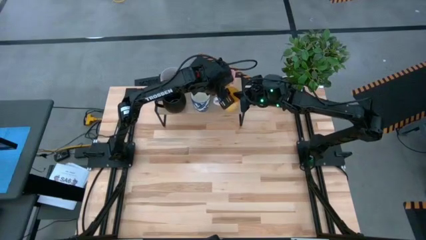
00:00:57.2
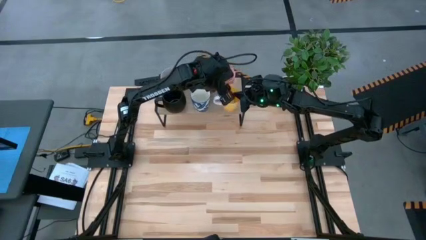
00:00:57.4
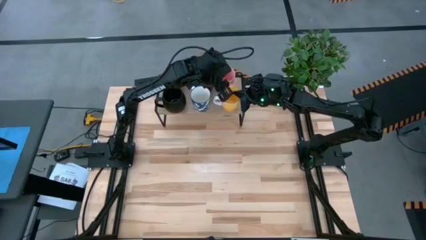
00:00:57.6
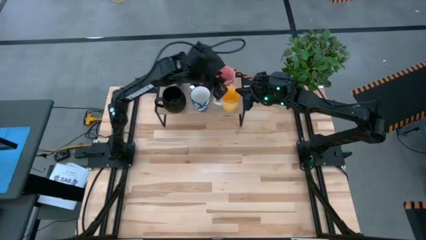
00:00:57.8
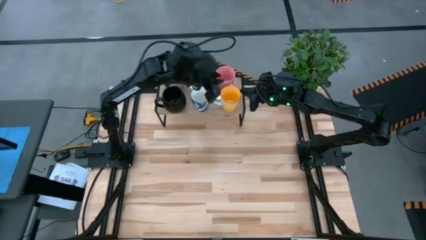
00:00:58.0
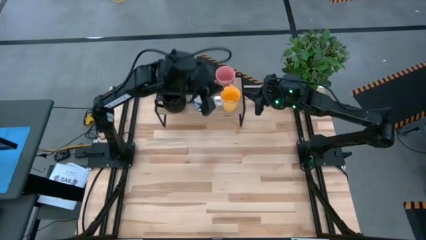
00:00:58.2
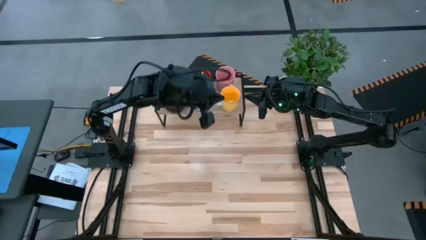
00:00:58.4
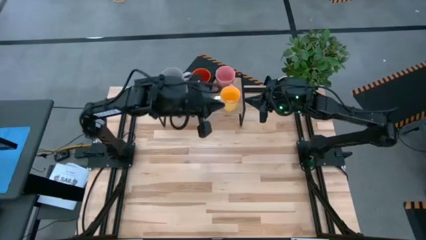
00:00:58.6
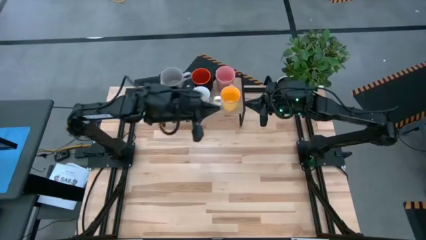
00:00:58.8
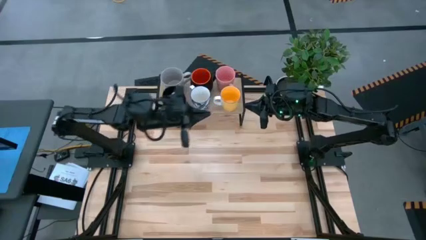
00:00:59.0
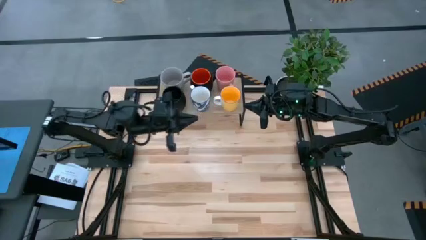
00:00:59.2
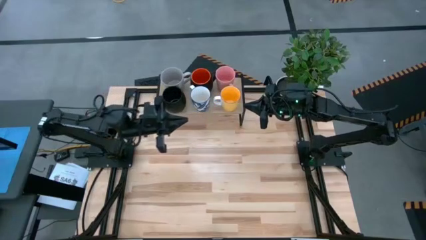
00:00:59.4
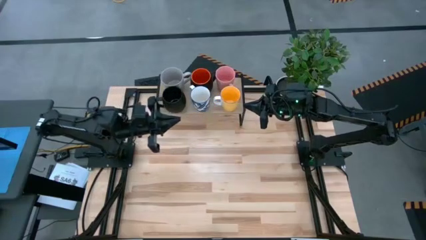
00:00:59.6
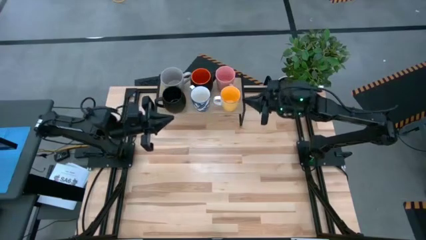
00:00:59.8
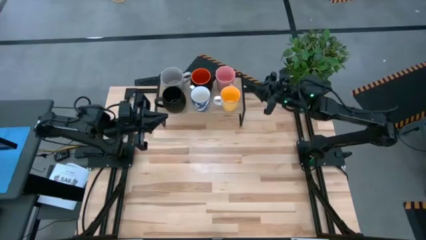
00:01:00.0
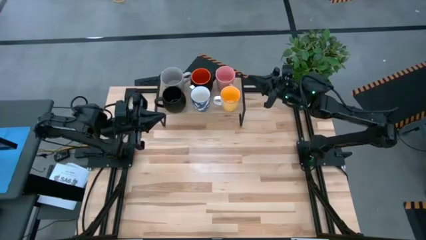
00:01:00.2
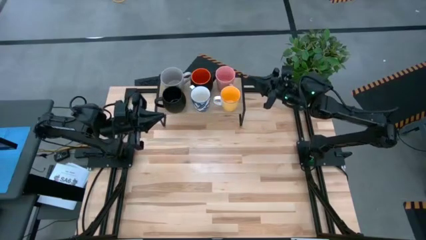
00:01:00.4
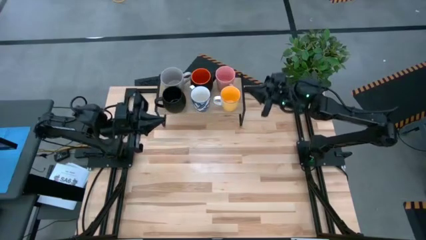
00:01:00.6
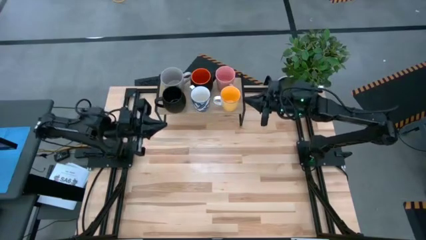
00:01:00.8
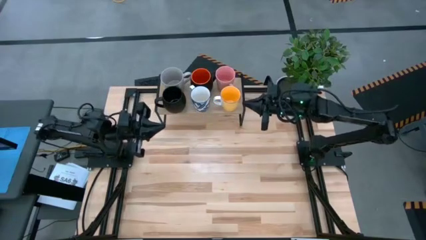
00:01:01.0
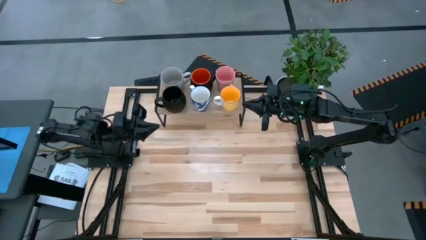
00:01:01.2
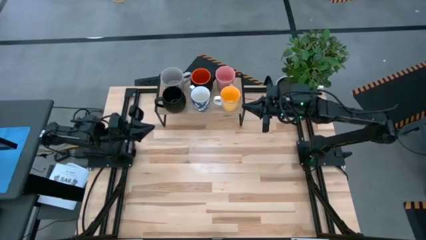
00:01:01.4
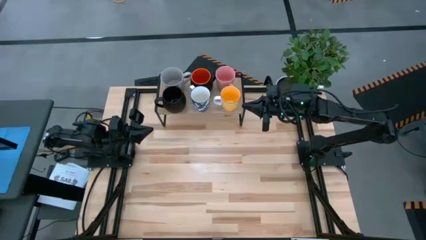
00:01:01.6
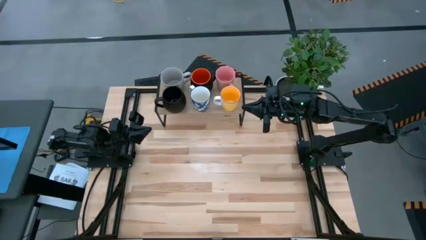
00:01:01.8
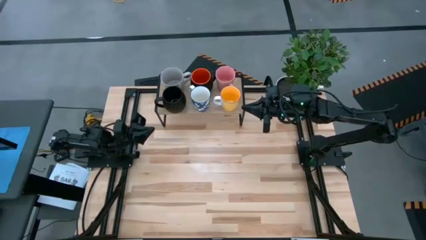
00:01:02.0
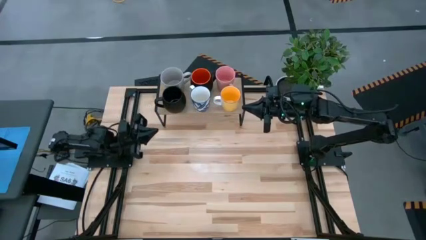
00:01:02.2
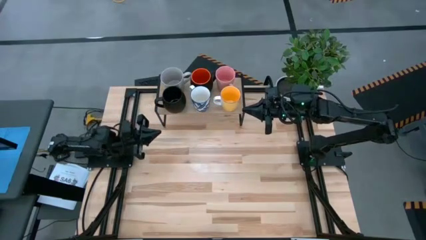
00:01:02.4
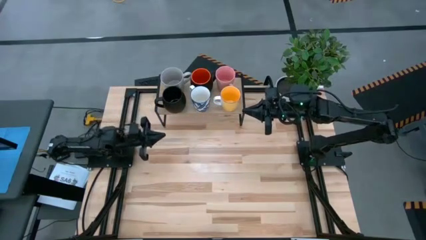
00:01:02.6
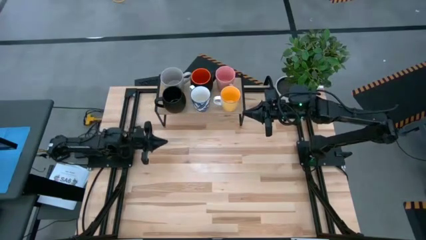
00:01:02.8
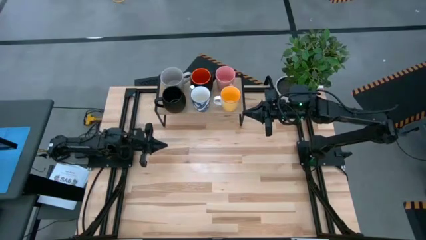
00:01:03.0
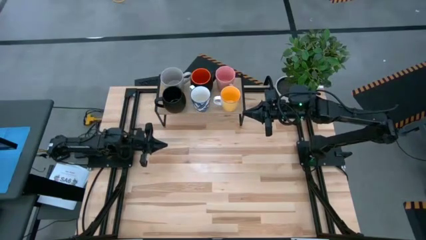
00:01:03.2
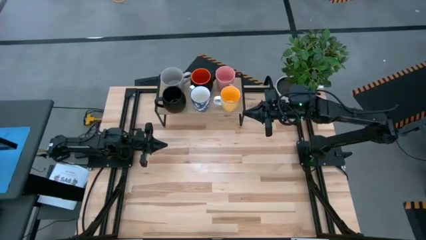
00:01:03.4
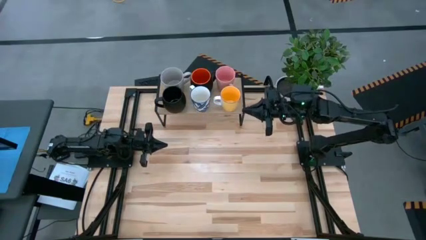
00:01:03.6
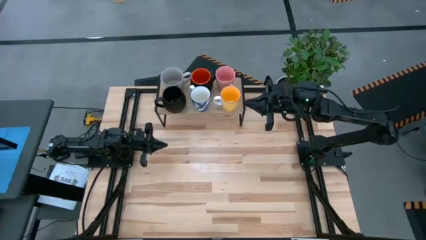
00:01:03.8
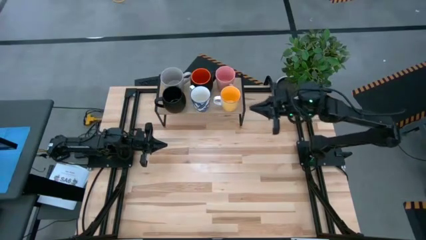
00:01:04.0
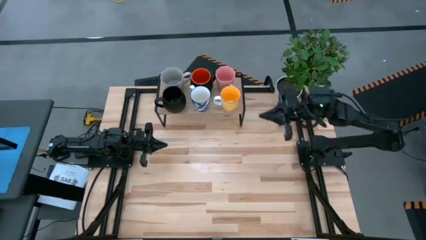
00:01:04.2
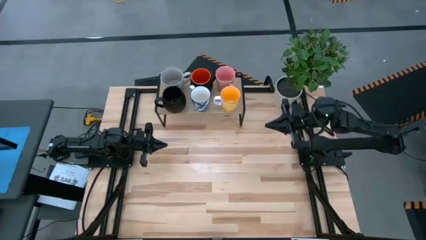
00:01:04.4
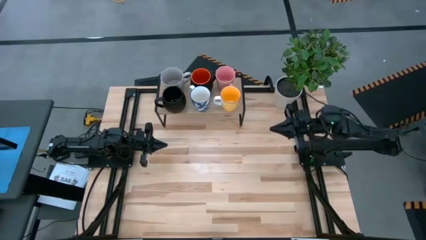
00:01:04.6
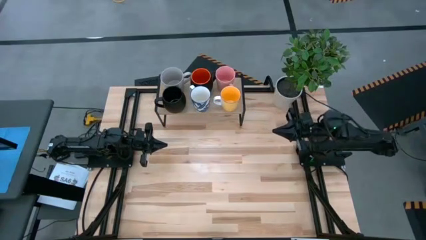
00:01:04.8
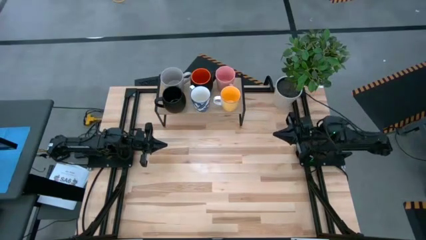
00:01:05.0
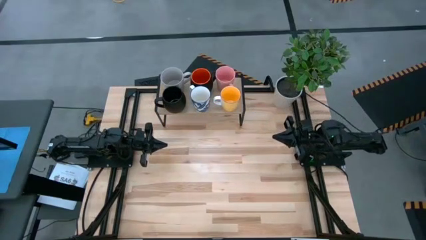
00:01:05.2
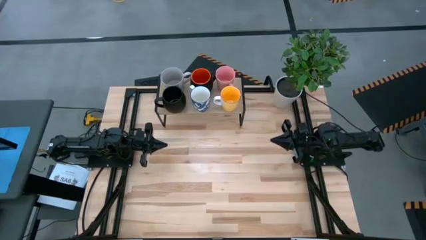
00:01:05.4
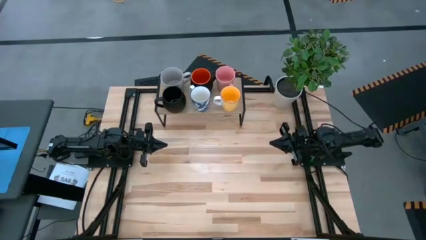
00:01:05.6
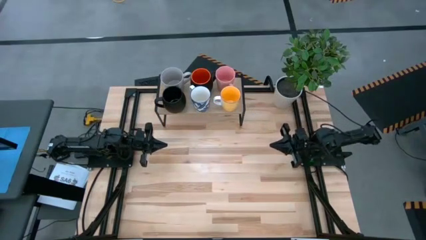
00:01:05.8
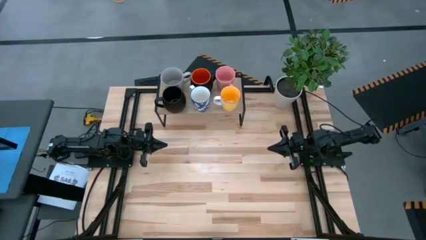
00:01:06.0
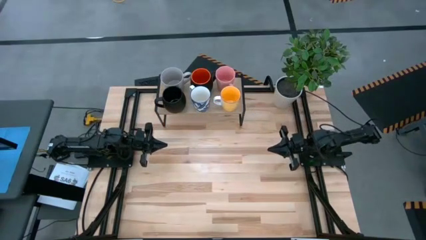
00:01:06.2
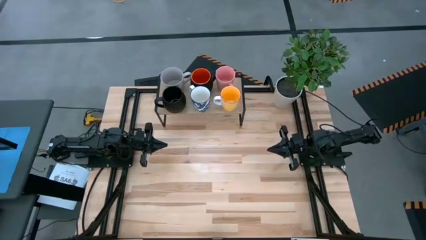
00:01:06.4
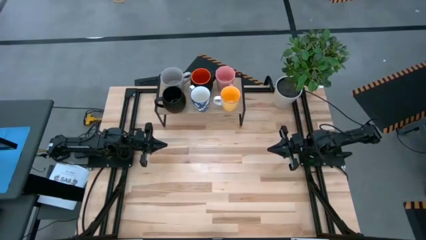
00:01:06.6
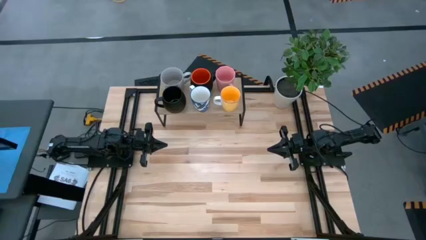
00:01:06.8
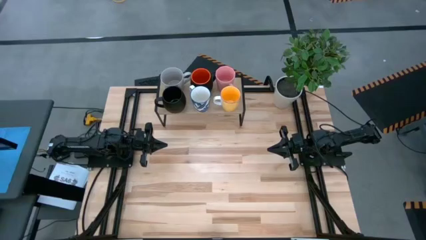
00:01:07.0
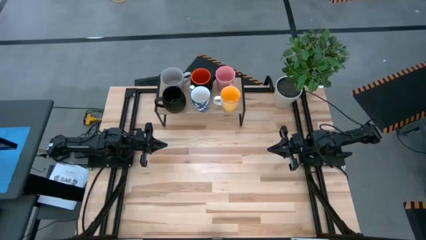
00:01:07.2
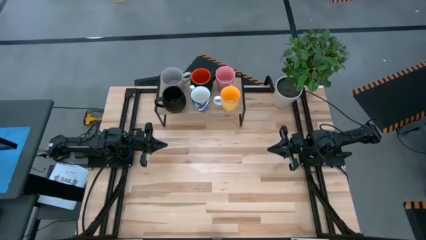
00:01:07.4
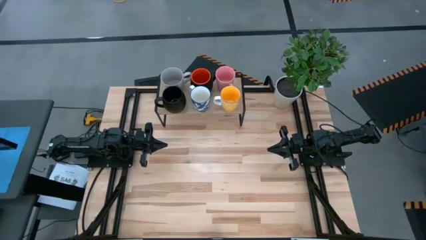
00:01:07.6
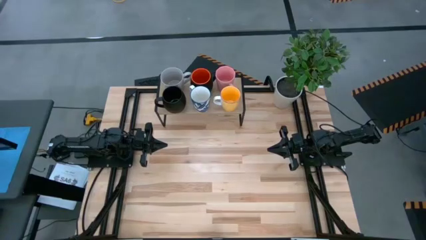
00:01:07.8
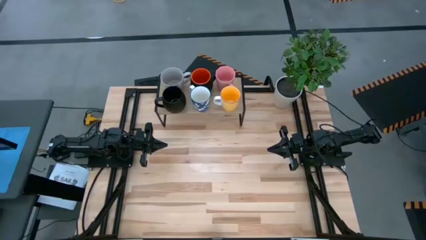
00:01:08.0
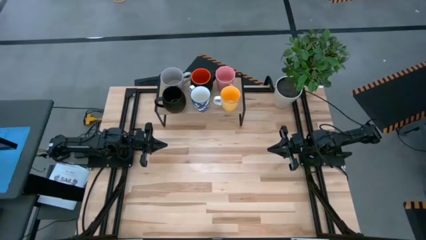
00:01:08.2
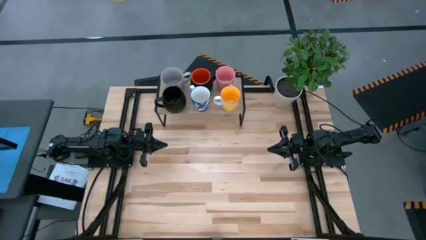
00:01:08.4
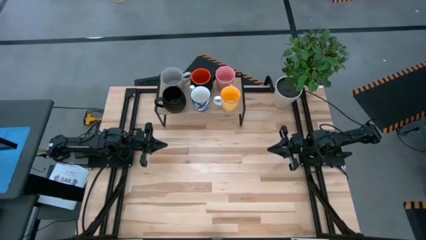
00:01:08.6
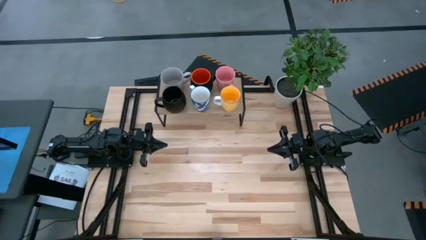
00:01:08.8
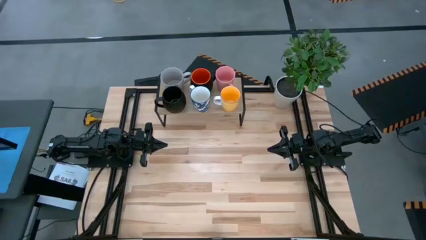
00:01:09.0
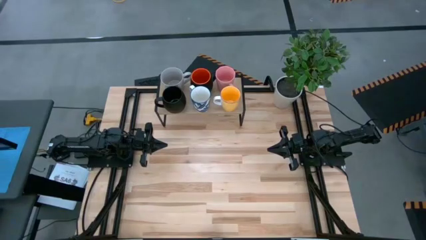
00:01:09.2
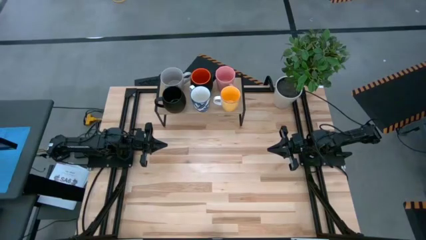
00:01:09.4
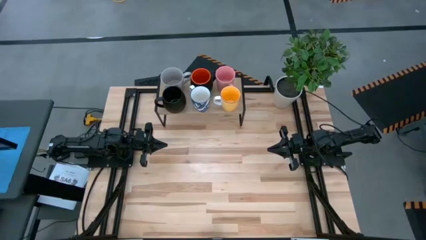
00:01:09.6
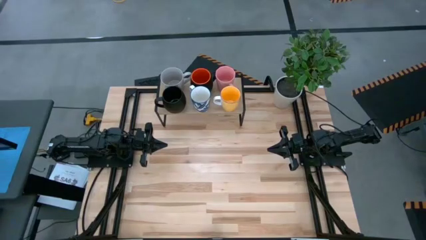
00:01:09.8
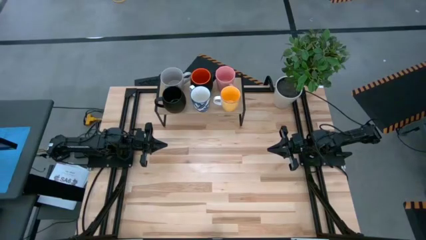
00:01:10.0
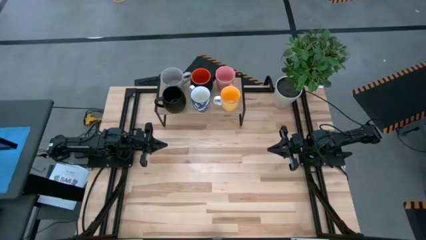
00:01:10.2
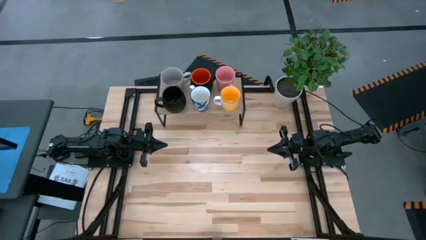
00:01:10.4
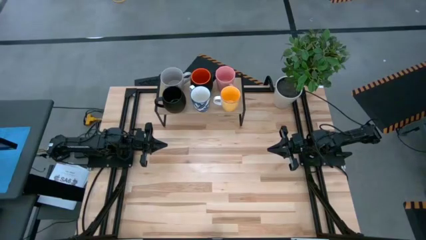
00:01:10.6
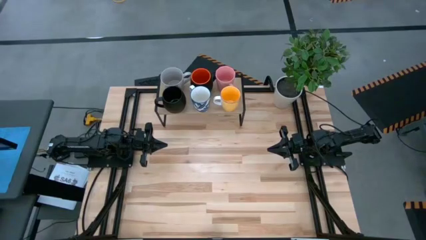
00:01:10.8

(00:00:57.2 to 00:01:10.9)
Task: Place coffee mugs
Return to Home Position

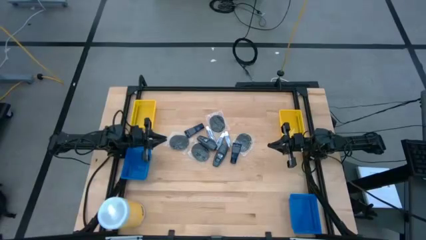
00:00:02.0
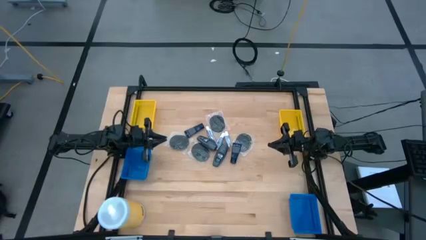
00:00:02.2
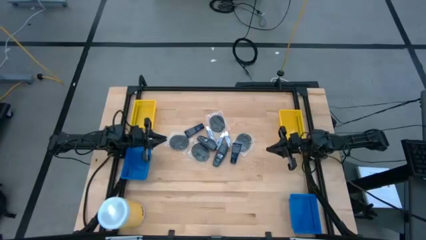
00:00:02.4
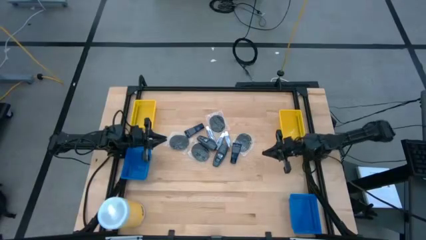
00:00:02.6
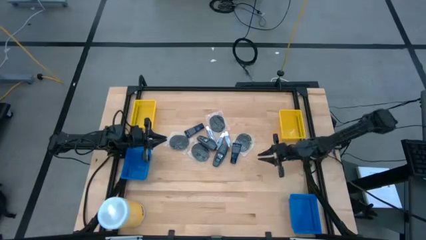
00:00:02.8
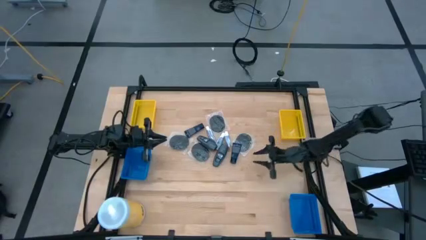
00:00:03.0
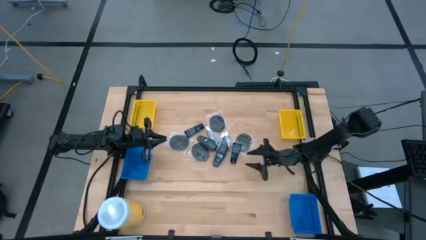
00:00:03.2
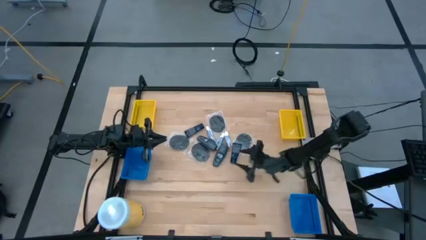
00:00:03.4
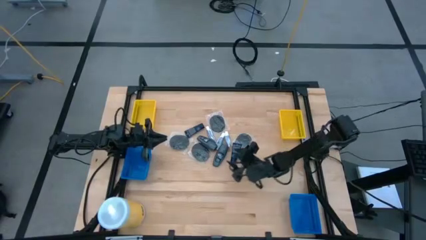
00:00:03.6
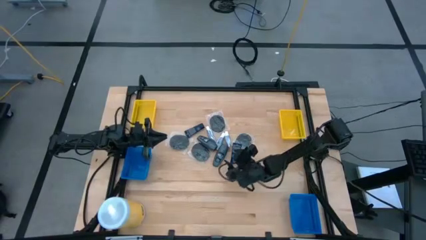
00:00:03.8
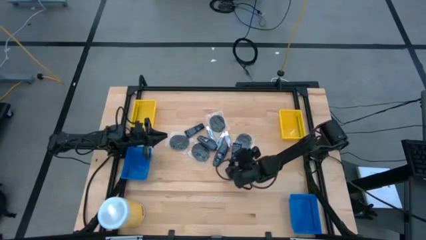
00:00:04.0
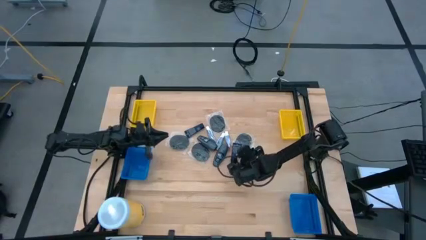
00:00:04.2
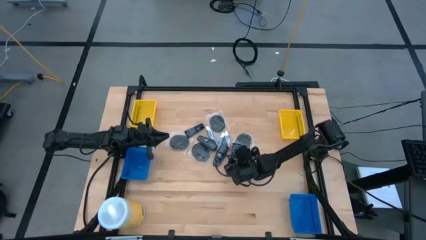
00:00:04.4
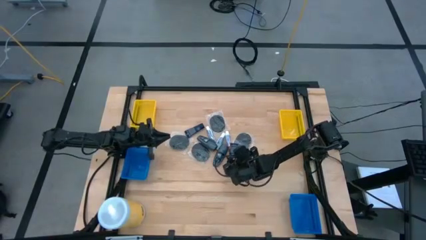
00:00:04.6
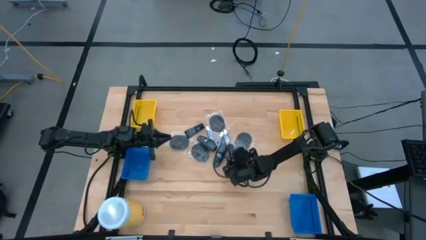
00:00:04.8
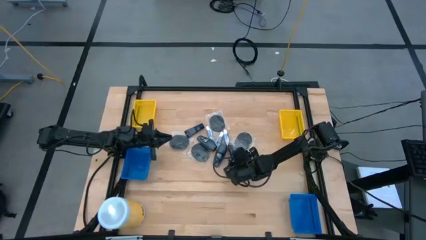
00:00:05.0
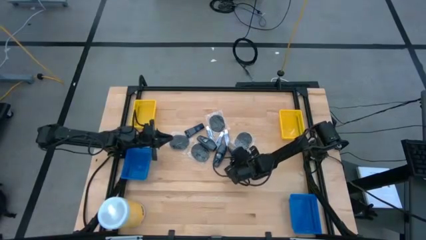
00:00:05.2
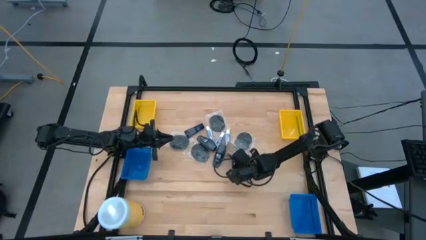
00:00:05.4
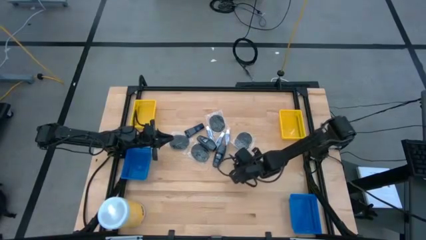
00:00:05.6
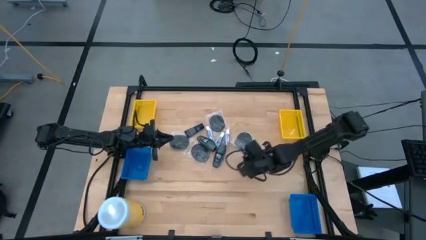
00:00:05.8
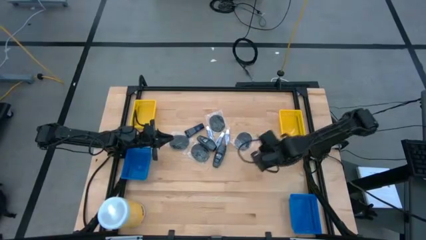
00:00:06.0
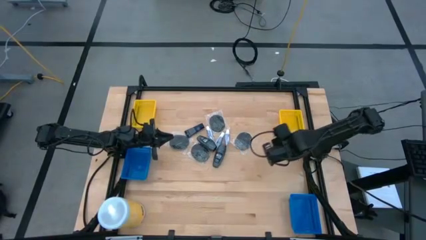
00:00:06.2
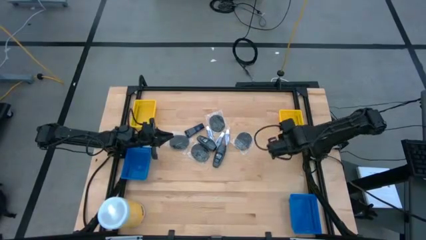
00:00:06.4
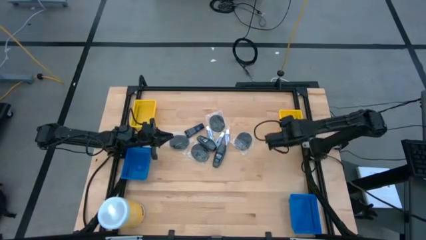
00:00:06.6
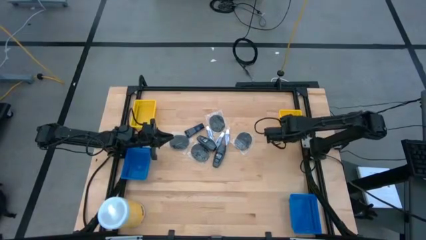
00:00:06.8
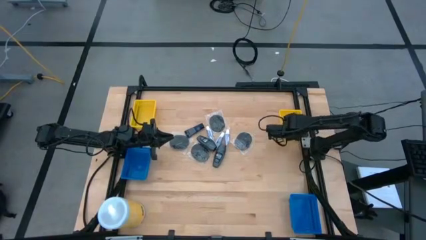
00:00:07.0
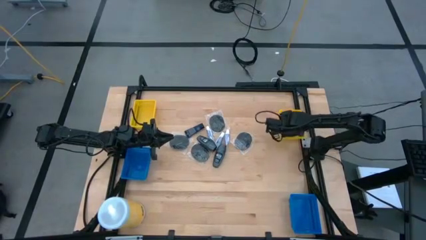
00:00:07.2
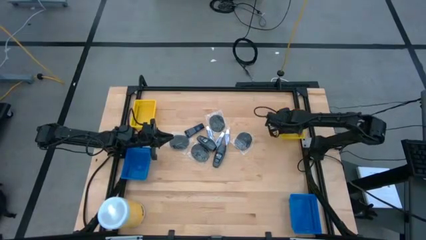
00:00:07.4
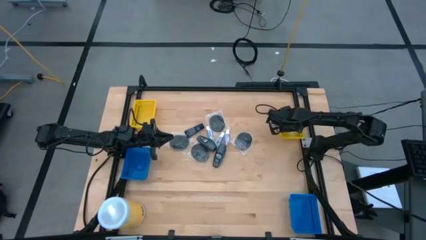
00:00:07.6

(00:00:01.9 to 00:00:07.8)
Task: Pick & Place Travel size toiletries
Put the blue shave cream into the right yellow basket
